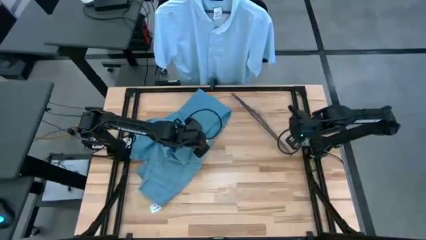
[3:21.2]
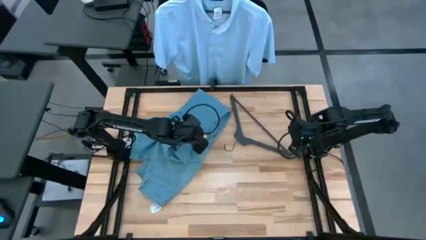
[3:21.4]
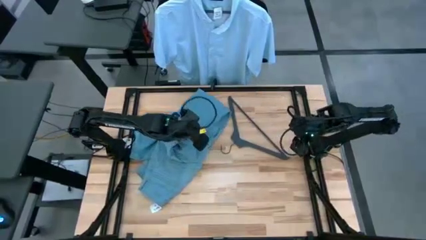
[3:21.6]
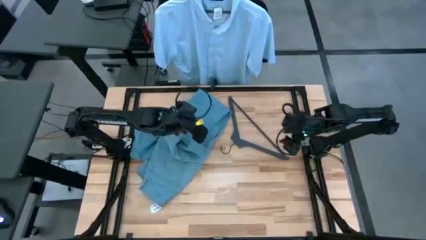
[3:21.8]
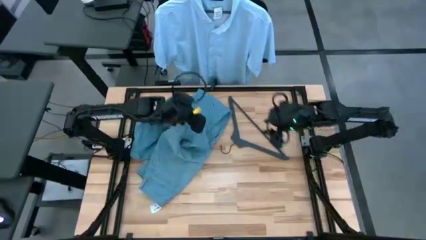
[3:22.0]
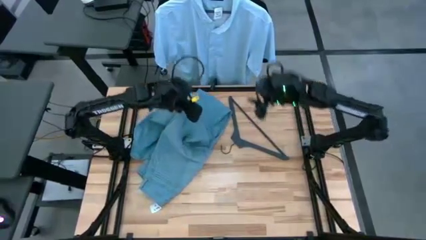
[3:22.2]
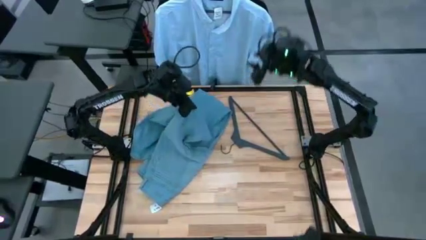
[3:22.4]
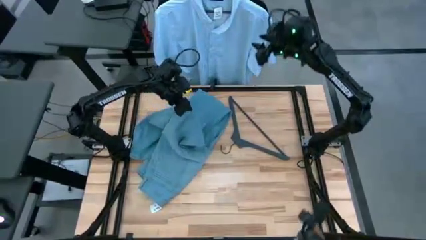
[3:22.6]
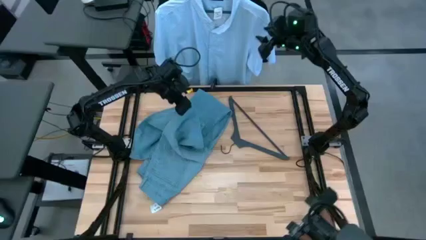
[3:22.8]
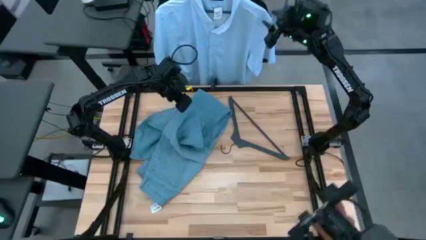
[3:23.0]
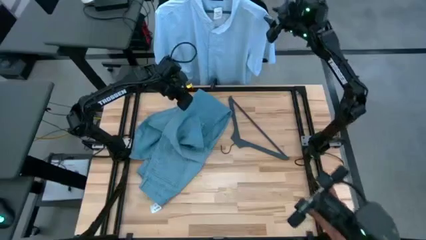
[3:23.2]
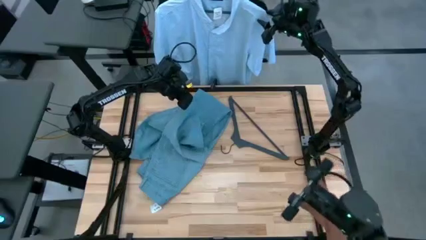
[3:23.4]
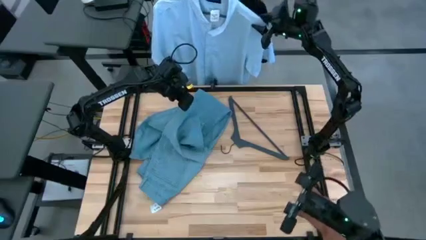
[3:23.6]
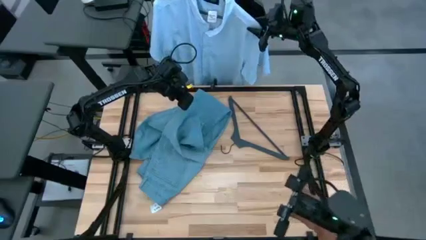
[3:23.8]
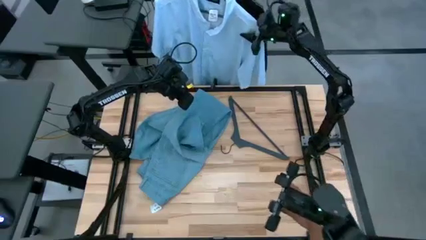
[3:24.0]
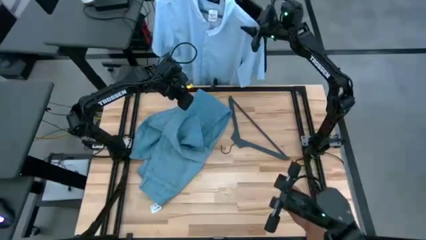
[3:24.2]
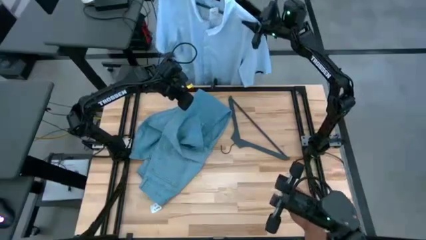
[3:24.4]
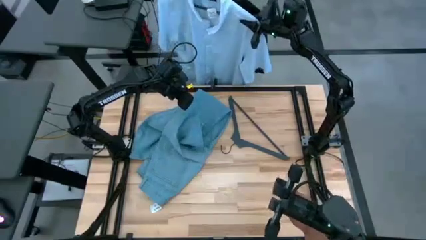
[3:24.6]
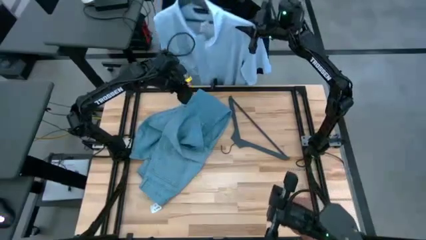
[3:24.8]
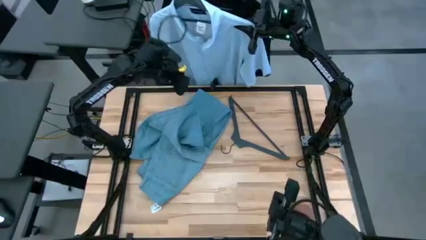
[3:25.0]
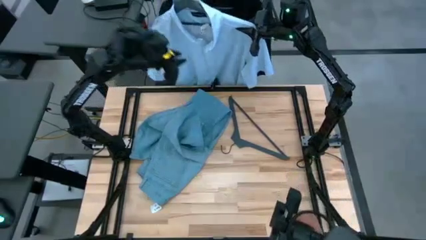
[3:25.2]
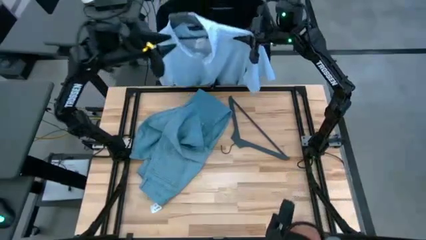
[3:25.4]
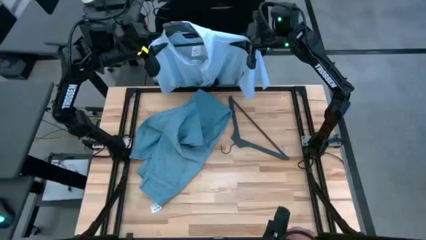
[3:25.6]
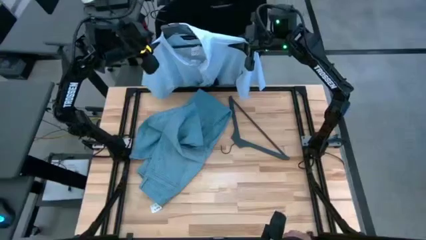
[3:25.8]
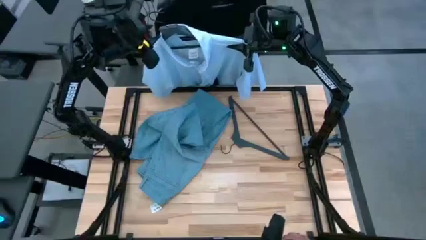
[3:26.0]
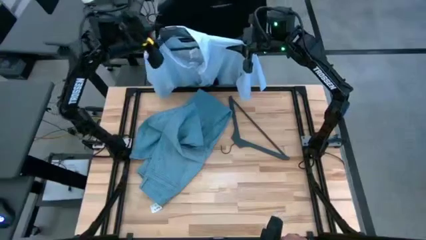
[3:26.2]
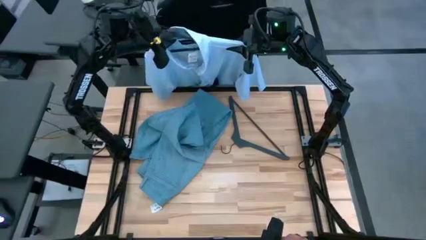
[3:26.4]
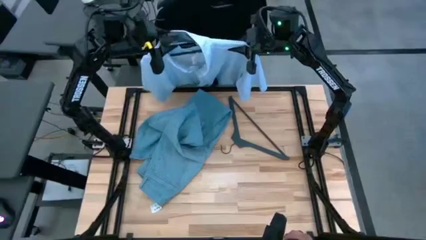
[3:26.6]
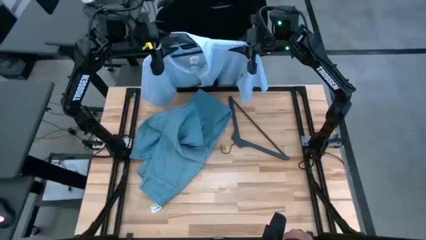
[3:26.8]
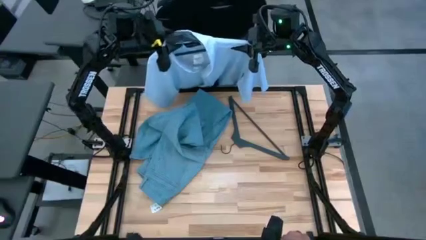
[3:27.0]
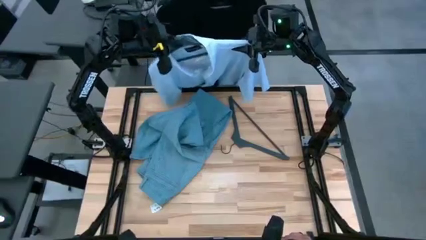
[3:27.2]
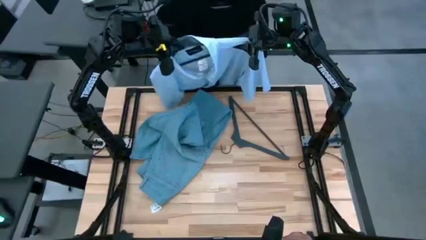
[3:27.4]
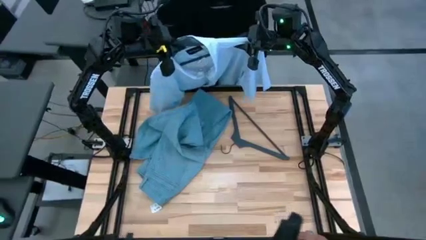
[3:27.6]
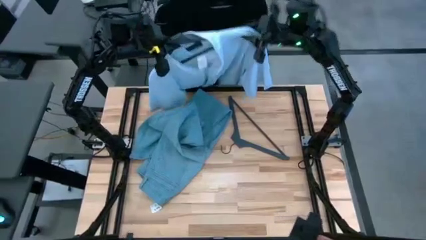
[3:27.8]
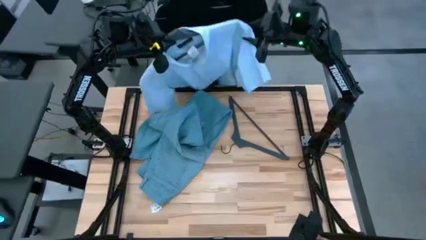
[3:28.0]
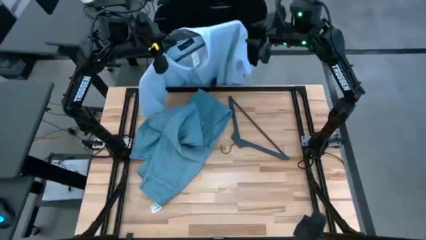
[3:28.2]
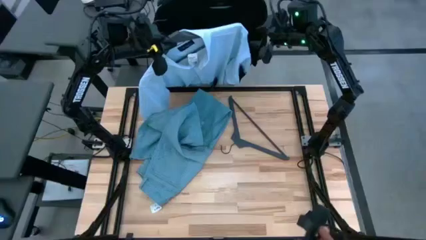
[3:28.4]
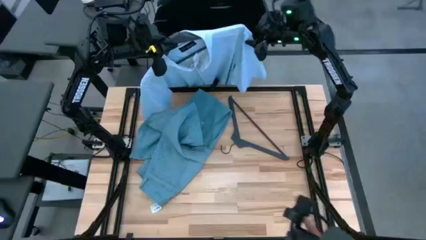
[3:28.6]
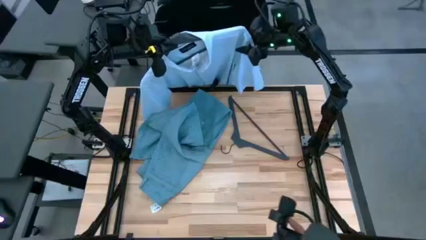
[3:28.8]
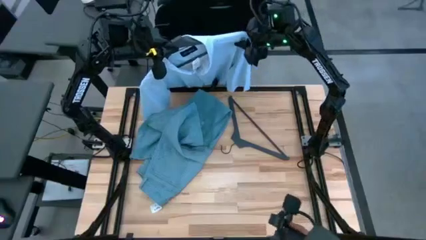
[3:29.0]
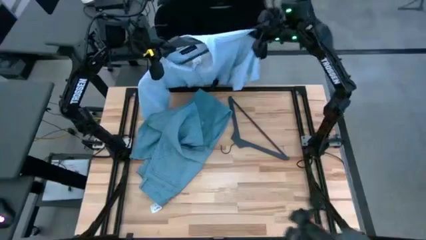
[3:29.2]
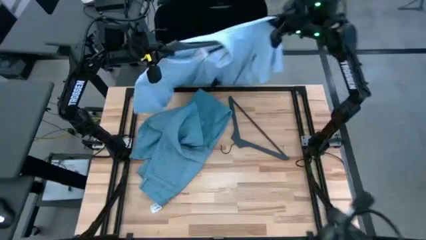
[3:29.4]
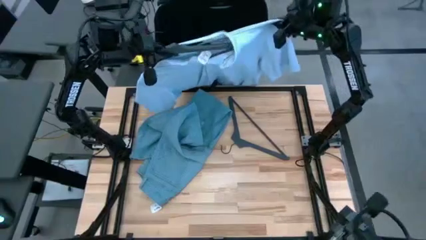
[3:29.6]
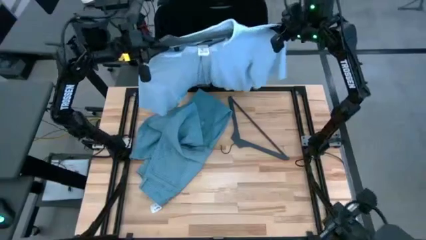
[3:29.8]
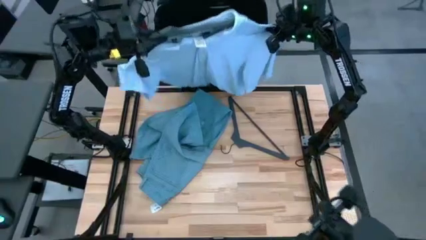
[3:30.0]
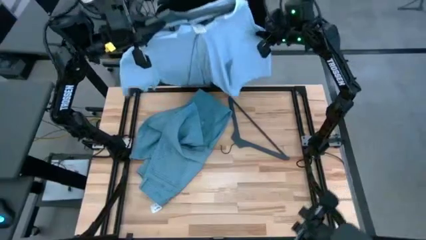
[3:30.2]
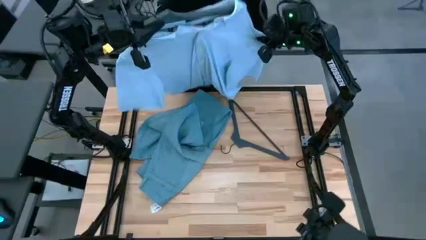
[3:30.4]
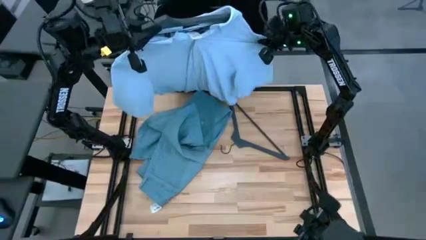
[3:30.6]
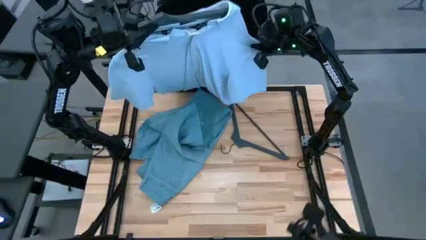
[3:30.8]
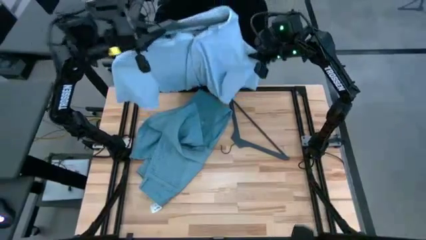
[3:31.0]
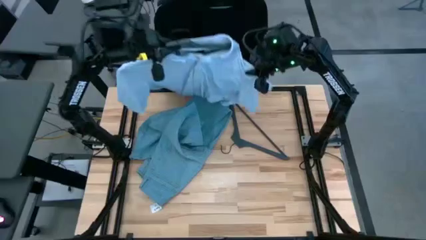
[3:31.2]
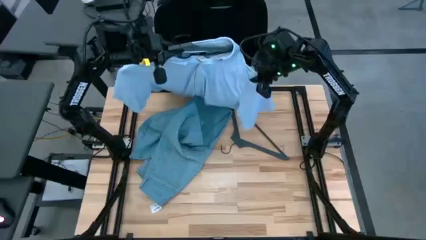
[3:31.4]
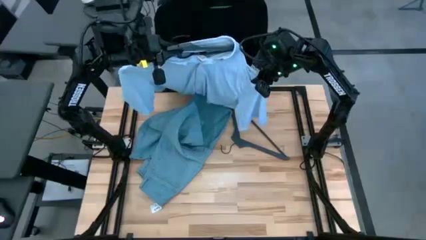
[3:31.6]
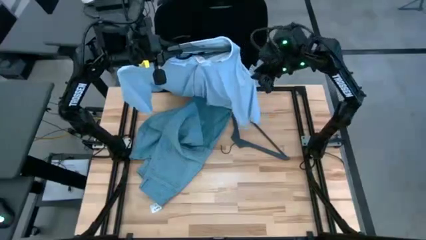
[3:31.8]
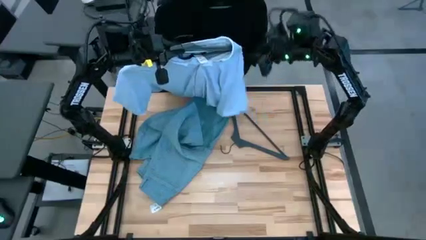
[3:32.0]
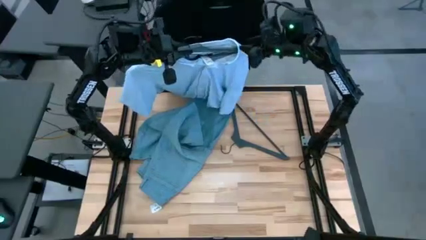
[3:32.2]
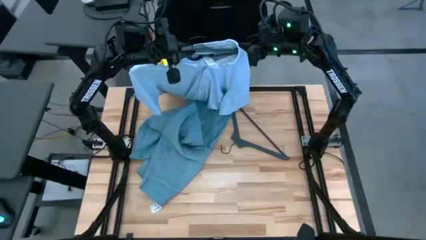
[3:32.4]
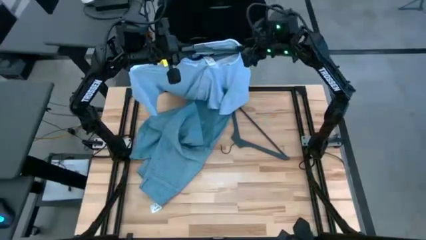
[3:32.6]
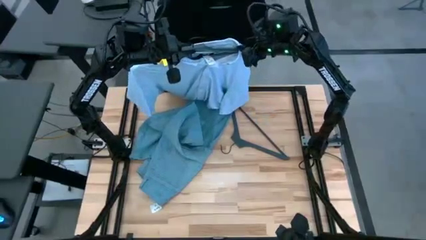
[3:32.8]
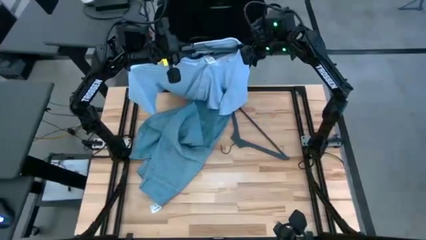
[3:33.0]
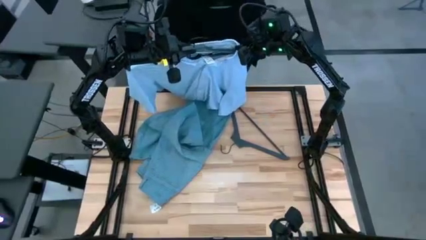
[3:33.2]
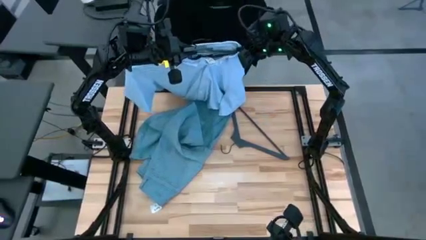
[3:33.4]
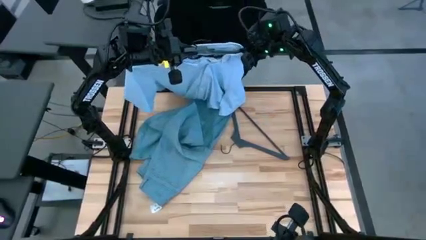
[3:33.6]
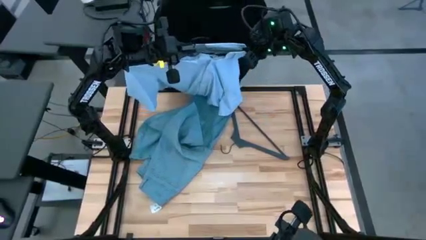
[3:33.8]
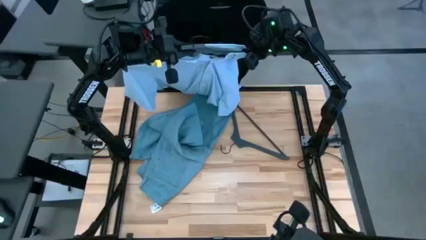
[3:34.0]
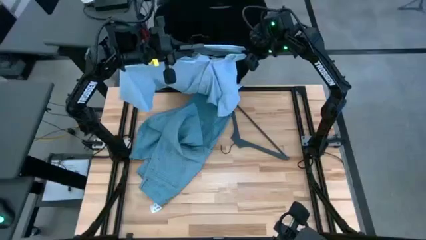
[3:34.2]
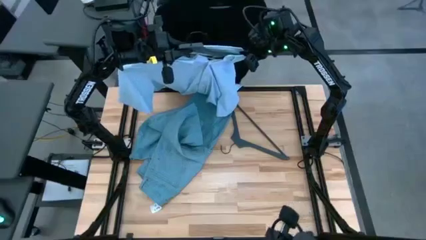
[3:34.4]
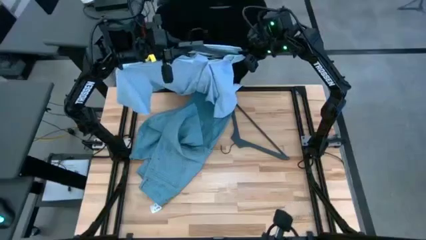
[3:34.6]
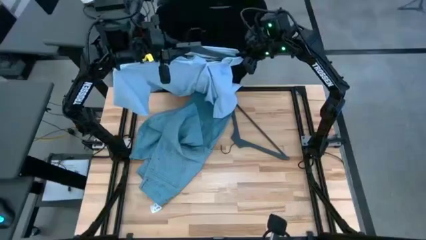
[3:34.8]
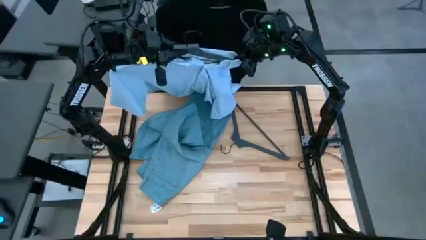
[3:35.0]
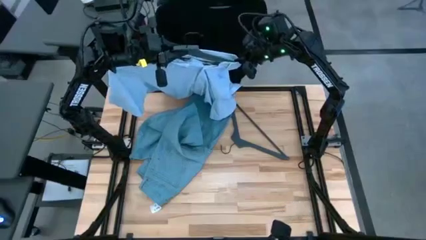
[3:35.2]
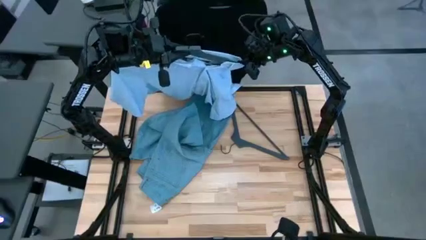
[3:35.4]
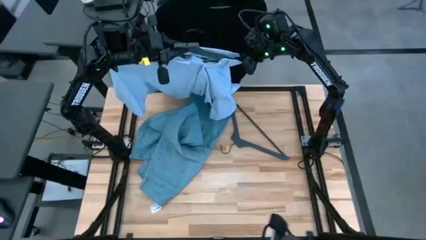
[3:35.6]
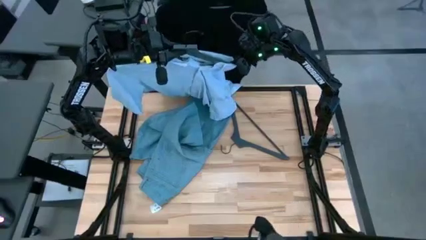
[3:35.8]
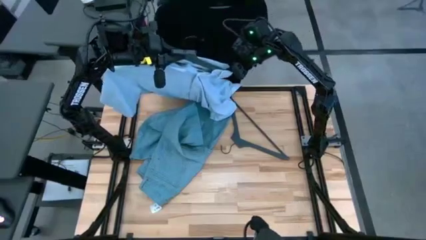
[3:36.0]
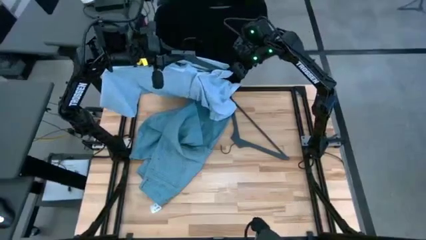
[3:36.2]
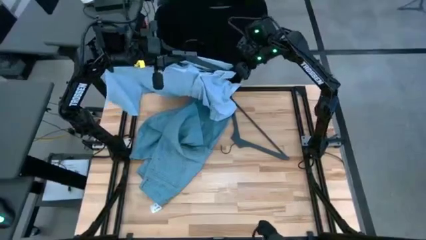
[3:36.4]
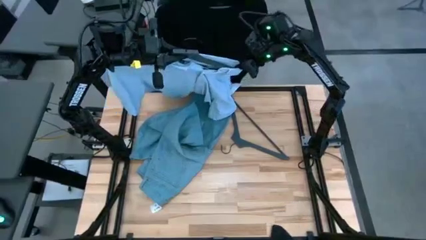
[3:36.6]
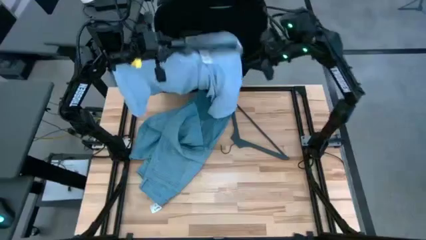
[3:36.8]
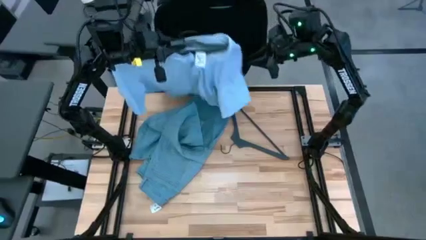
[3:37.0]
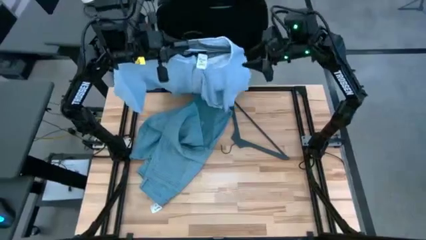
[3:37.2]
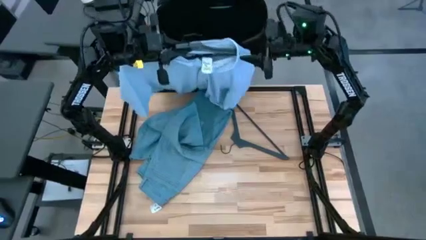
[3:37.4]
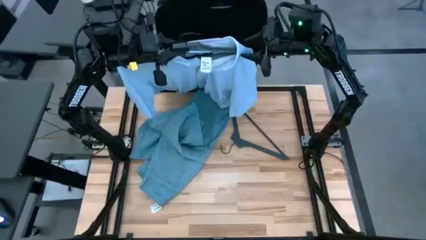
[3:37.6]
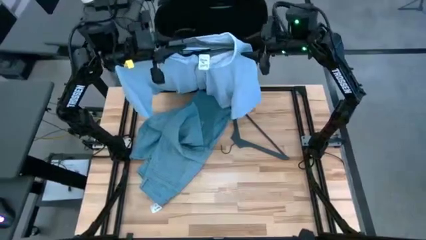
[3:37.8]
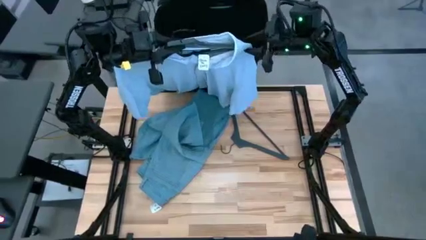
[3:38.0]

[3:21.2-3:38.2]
Task: Hang clothes
Unhang the blue shirt from the rack
